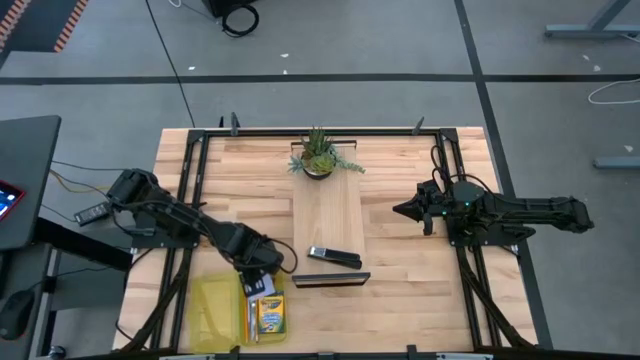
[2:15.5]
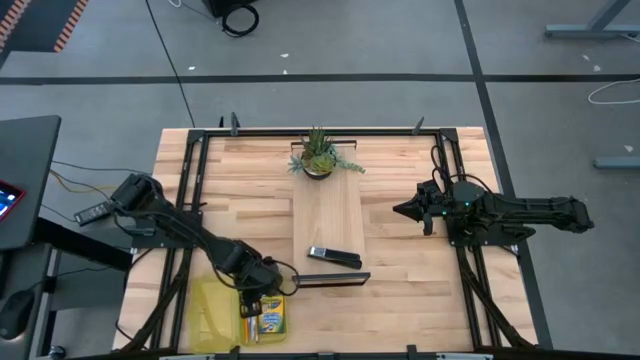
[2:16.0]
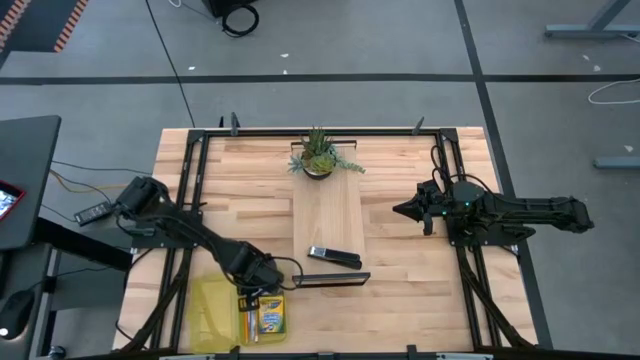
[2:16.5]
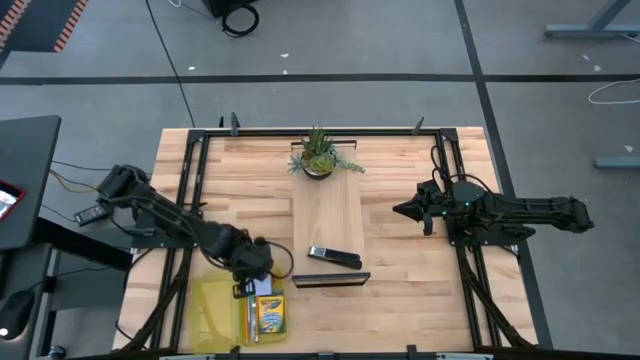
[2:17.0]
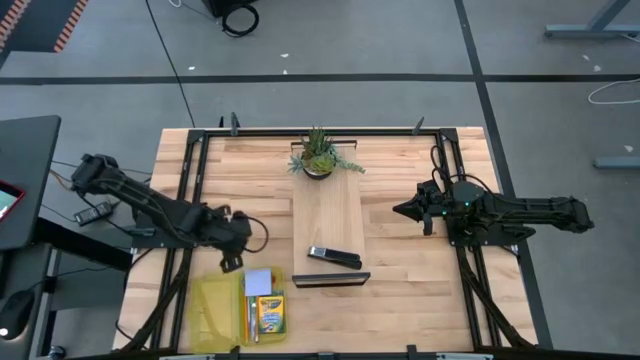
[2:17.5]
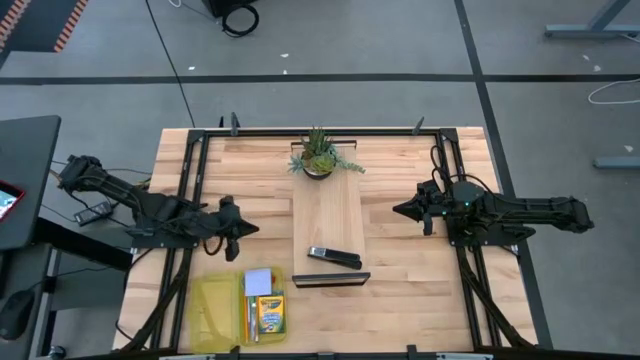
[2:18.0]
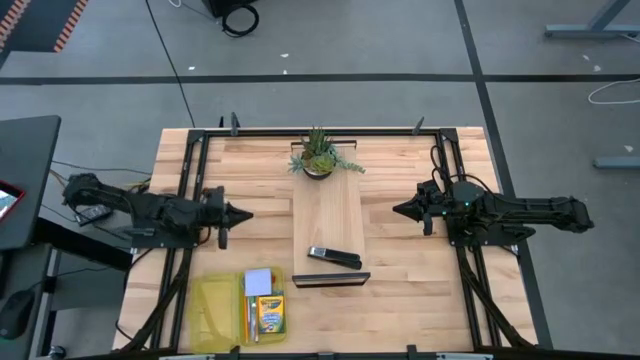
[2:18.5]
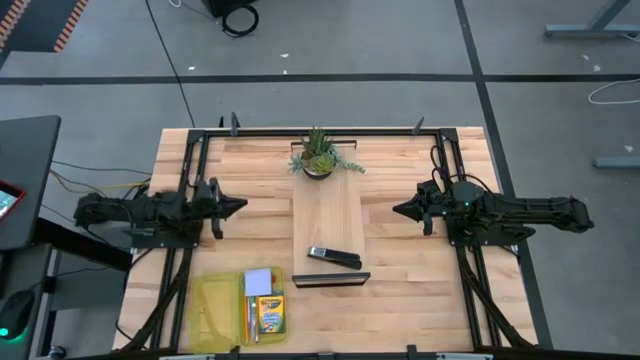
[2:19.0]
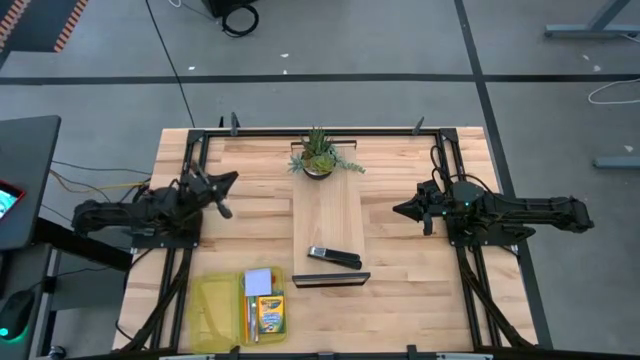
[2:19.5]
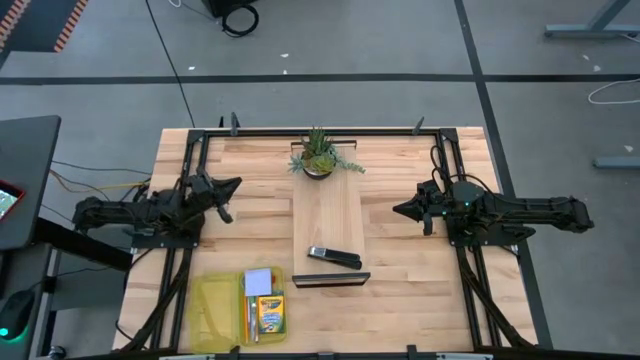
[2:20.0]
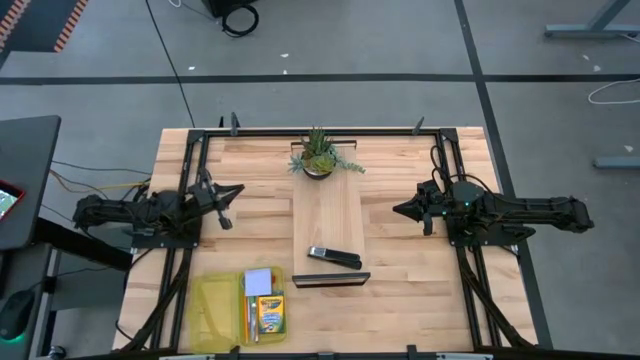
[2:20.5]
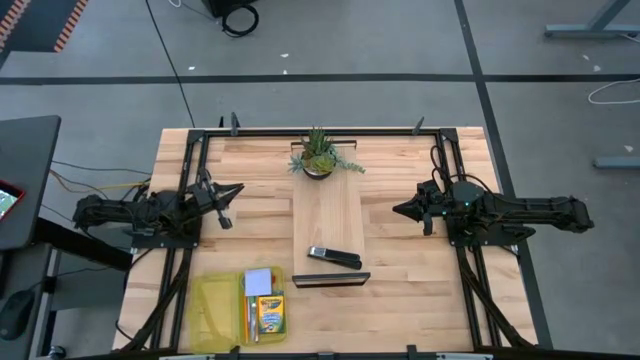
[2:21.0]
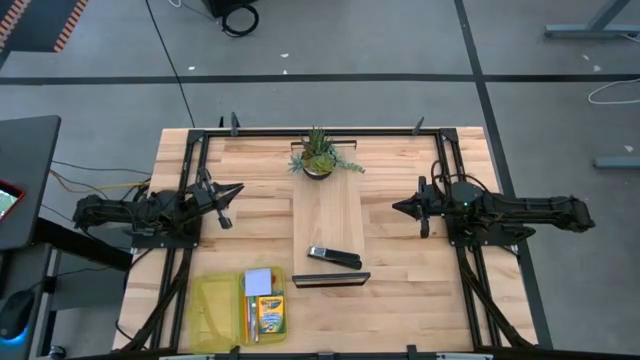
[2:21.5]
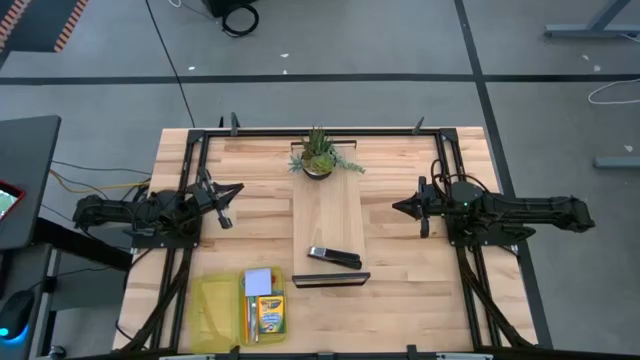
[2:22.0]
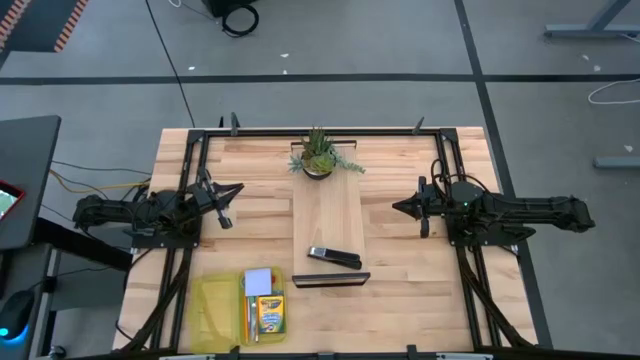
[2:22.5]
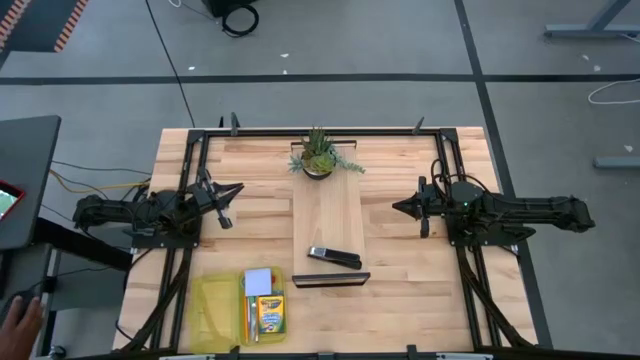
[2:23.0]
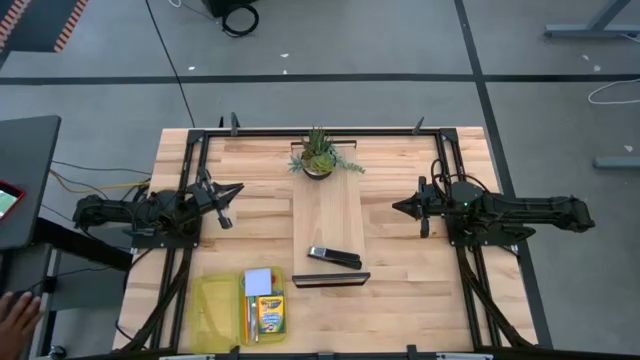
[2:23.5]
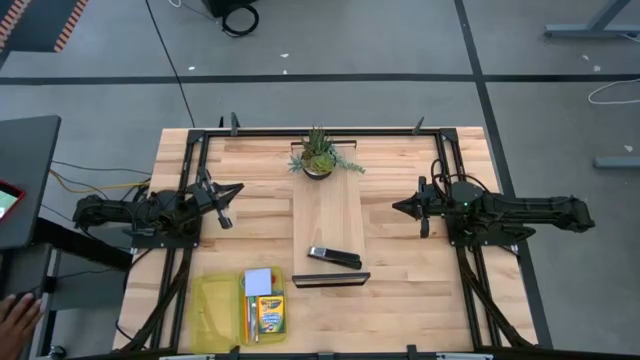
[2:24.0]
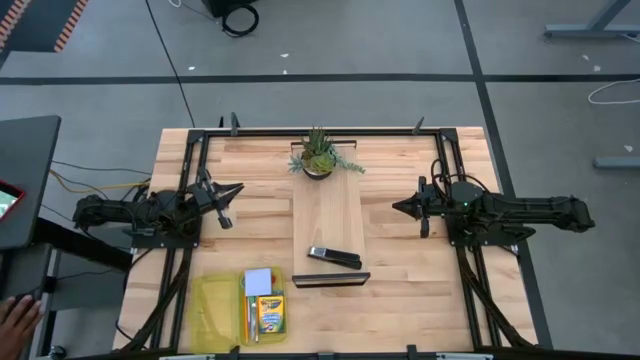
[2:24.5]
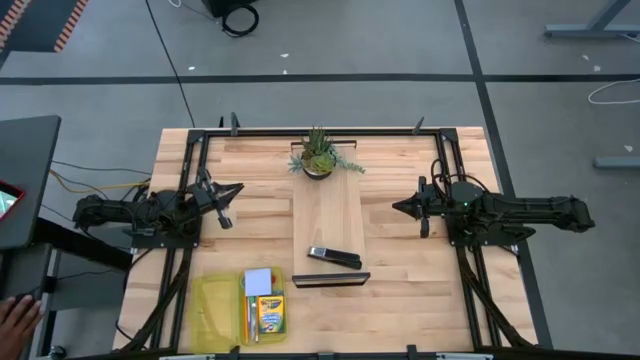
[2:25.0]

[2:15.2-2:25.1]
Task: Pack school essentials
Return to Home Position

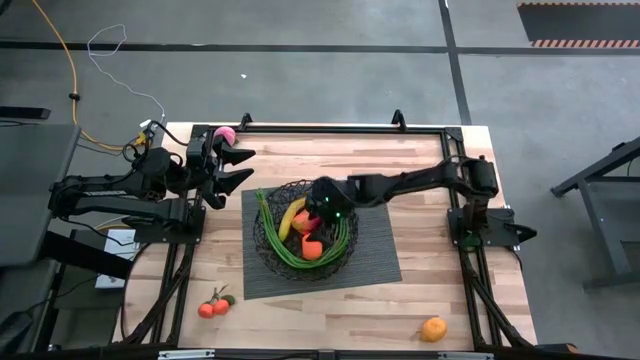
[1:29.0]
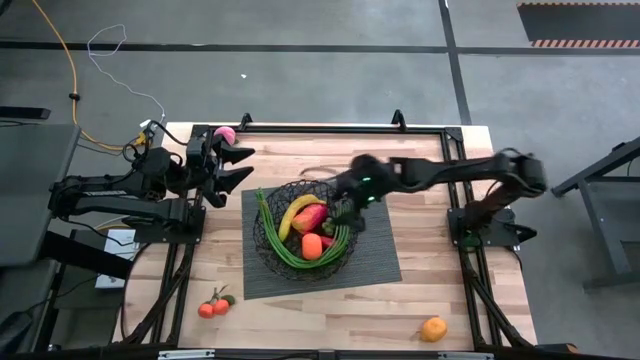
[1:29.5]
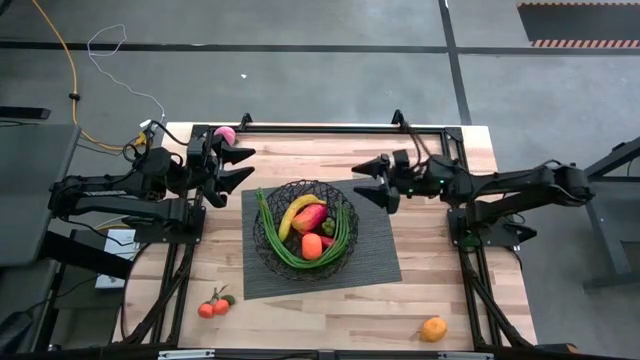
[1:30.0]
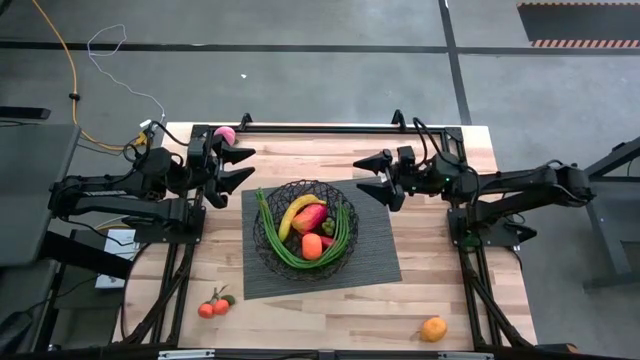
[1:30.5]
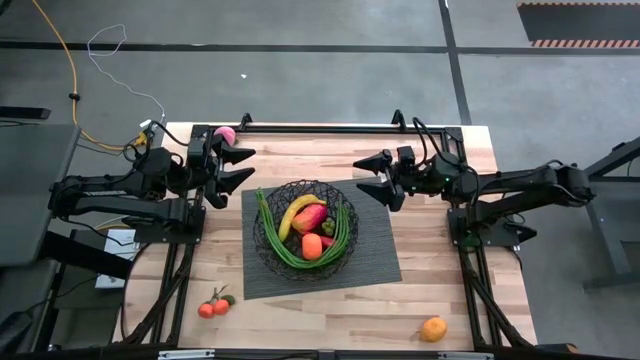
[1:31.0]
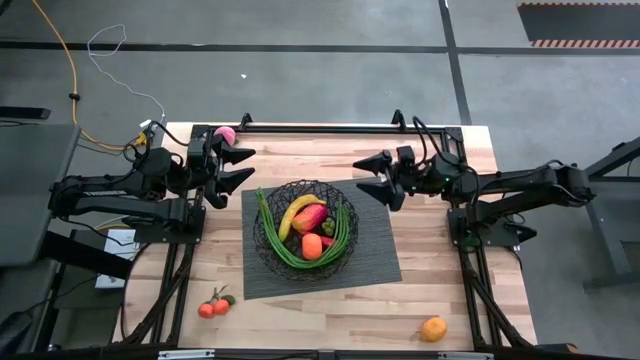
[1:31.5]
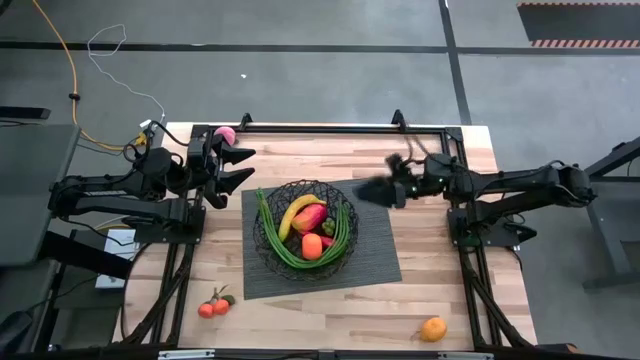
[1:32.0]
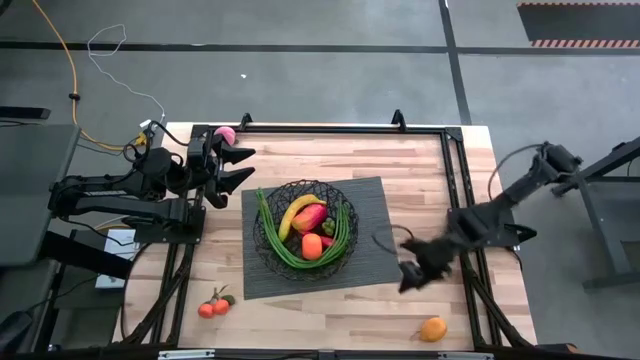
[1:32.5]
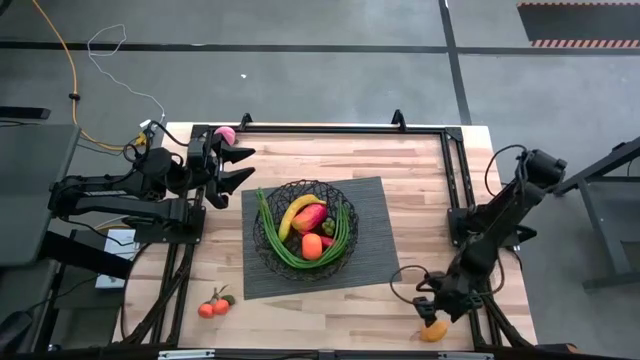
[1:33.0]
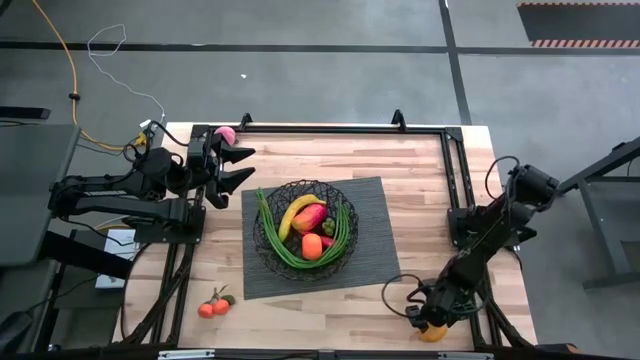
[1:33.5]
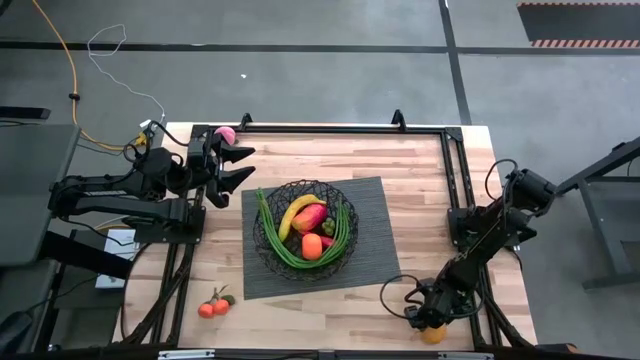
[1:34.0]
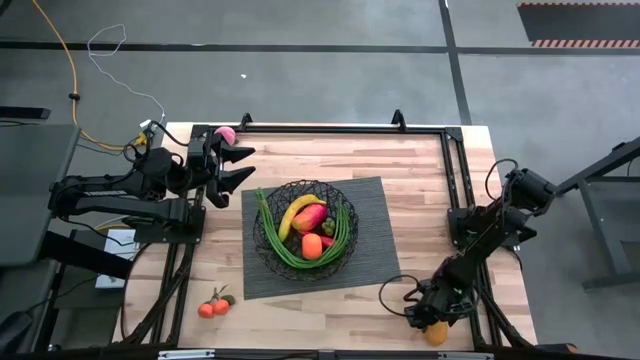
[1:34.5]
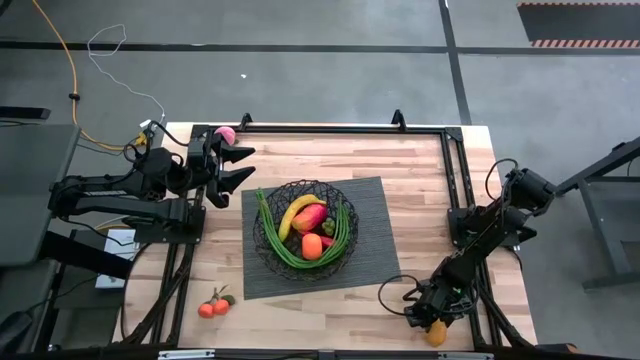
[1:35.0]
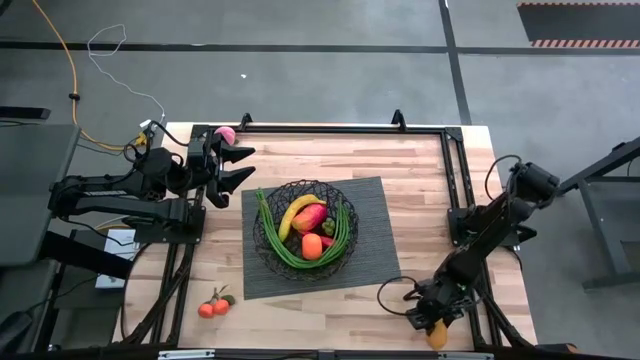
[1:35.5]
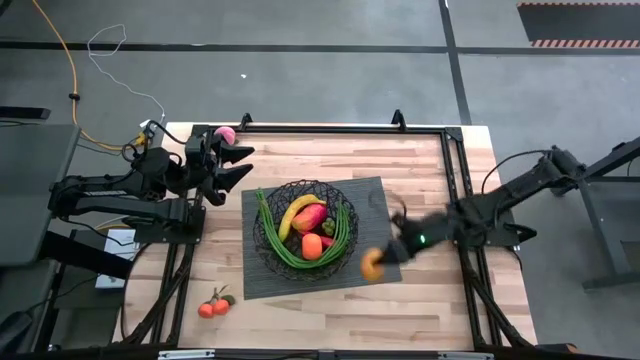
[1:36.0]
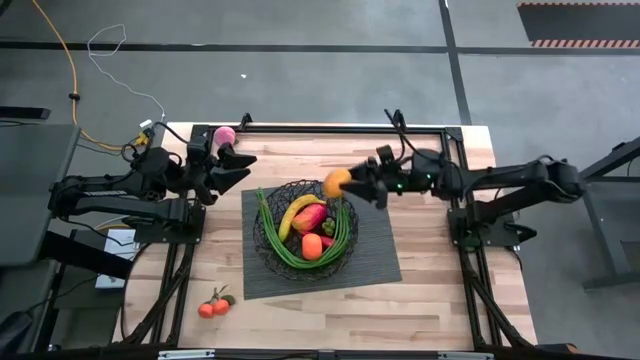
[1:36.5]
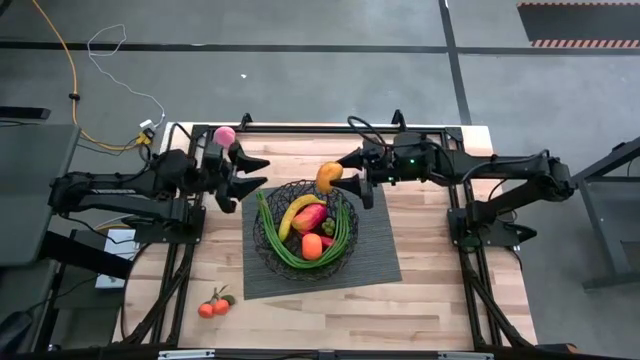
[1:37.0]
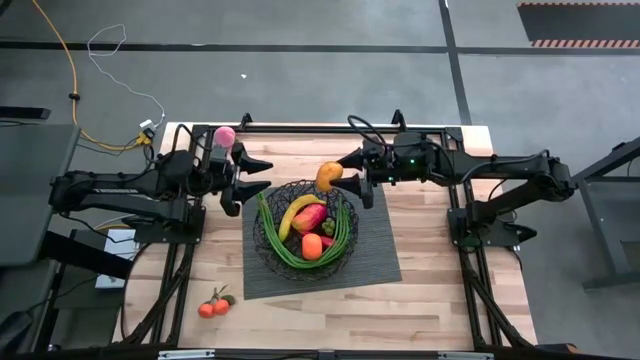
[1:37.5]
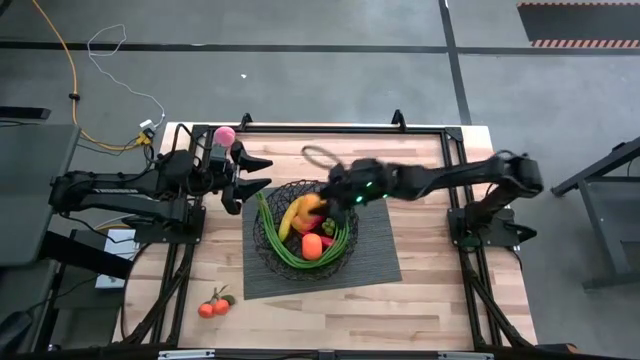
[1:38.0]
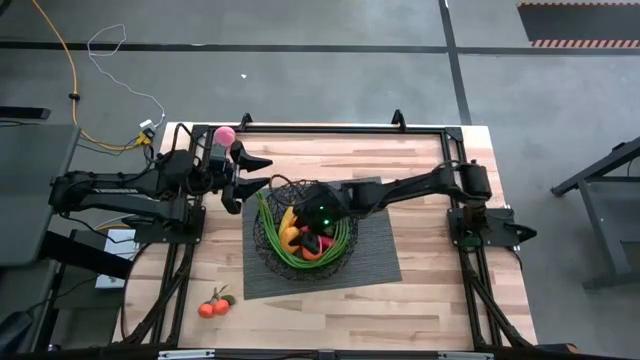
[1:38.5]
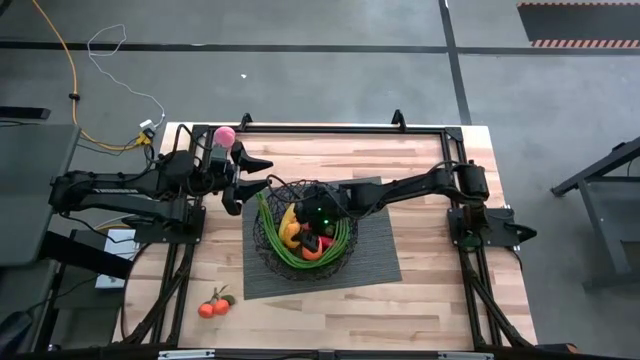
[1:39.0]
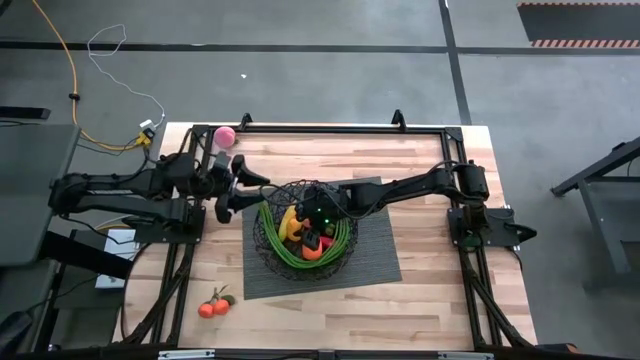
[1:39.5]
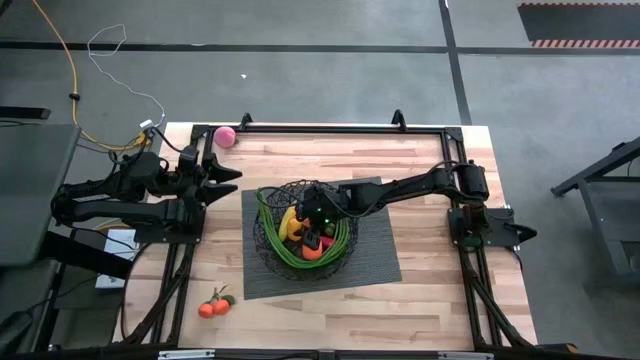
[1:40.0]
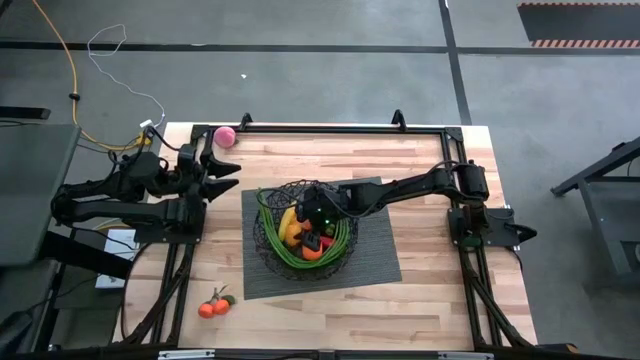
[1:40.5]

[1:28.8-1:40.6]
Task: Build produce basket
Put the yellow lemon into the black mesh basket
